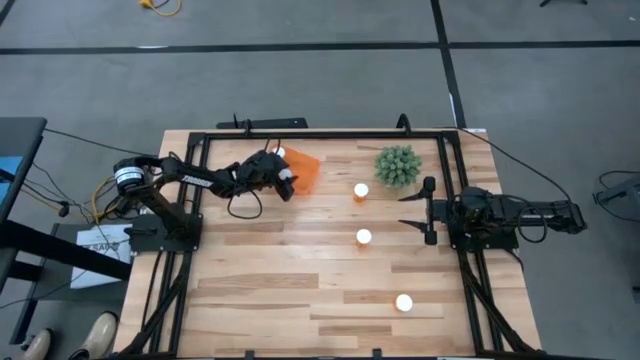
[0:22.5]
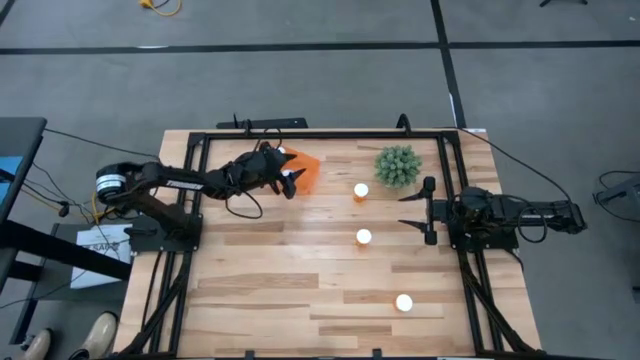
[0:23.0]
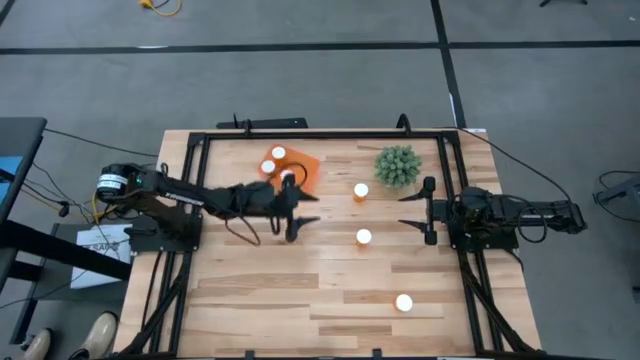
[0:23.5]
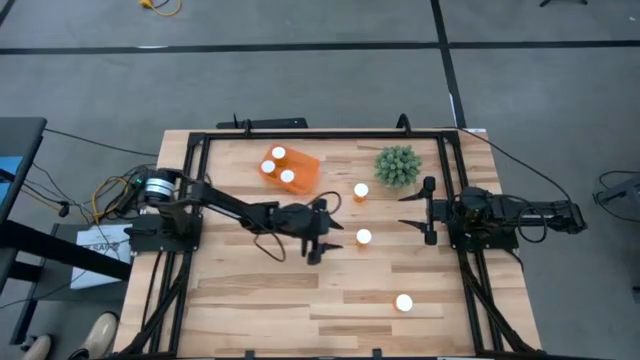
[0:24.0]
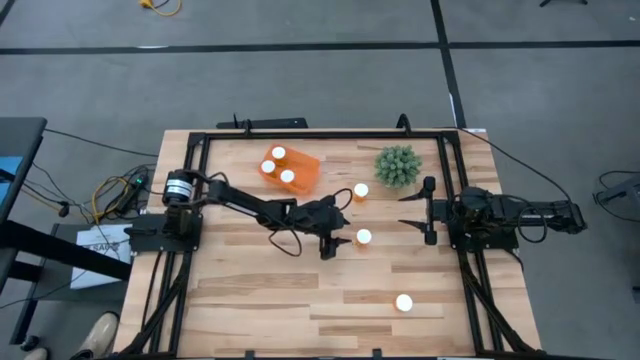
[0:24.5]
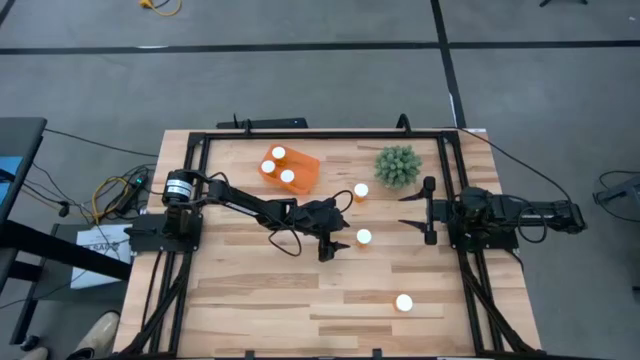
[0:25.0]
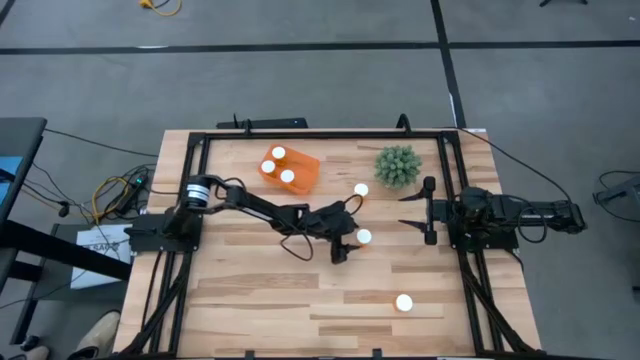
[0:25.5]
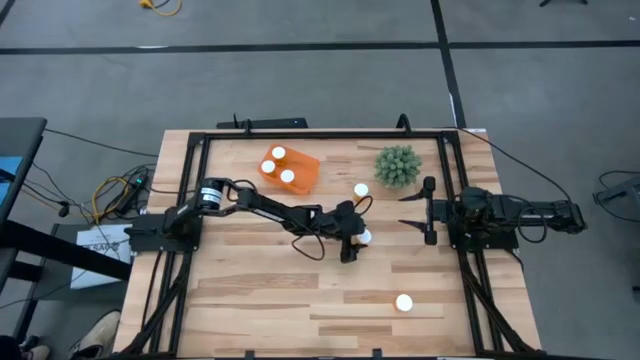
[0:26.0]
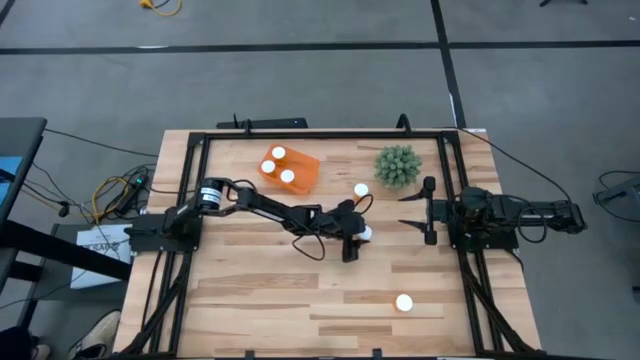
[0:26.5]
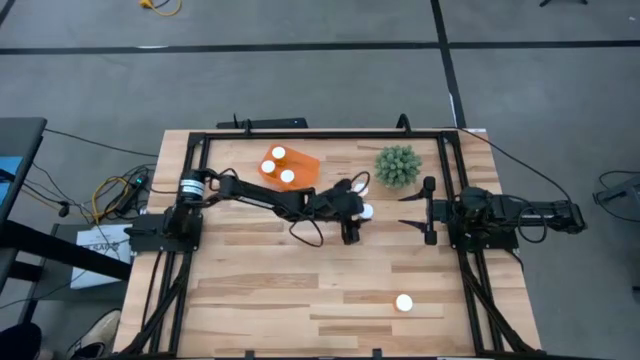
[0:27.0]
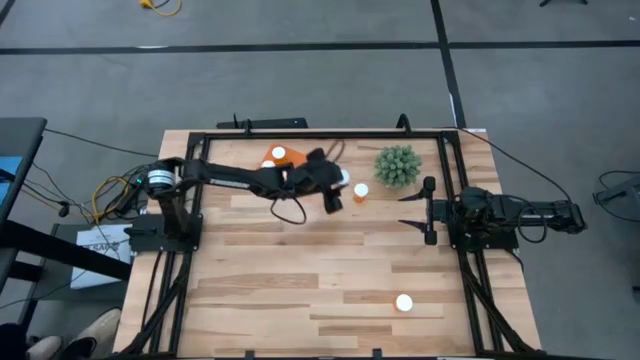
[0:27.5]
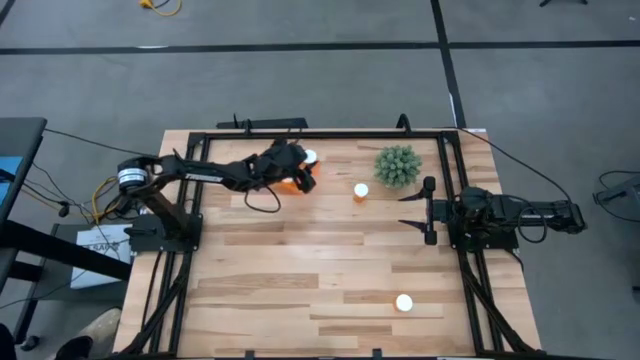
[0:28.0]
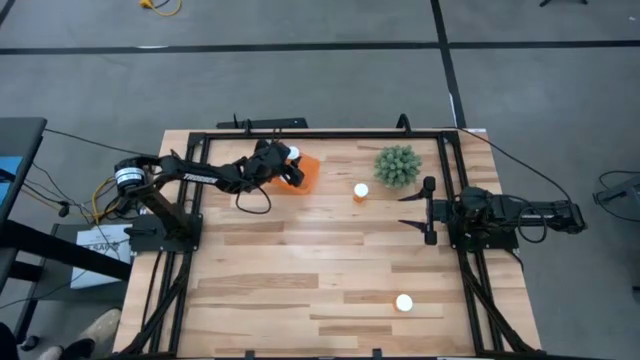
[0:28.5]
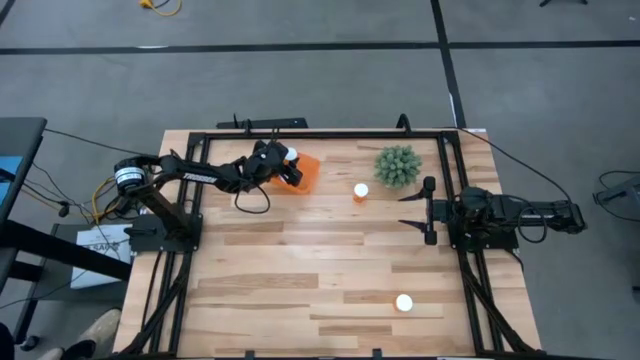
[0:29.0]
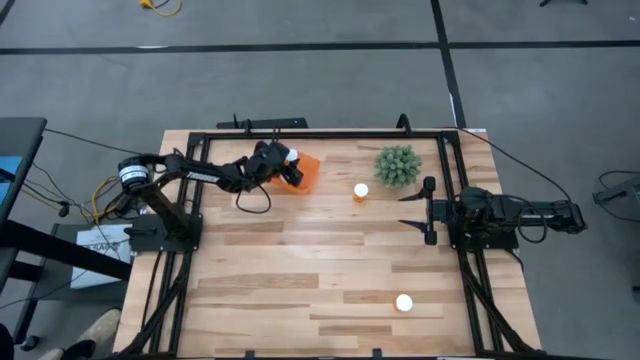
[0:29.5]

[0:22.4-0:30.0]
Task: Pick and place pill bottles into a basket
Put the orange pill bottle into the orange bin

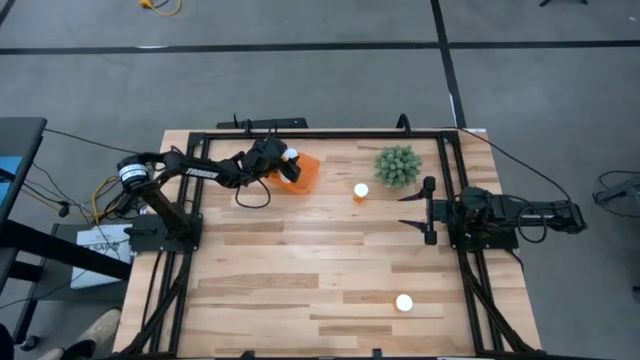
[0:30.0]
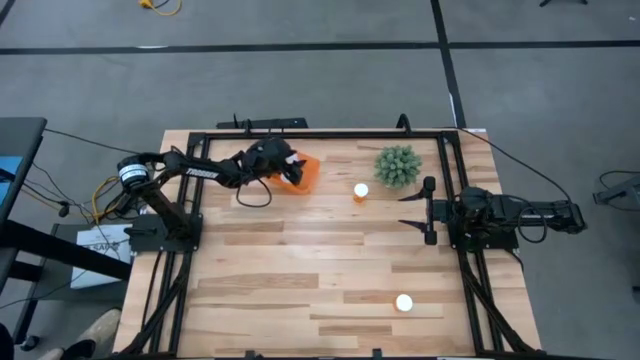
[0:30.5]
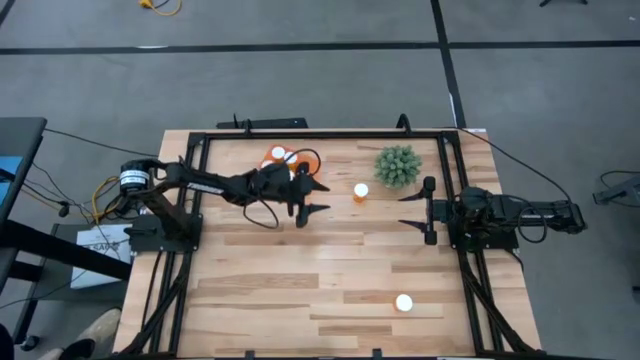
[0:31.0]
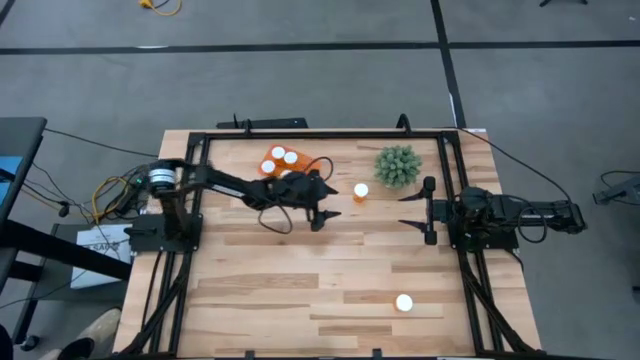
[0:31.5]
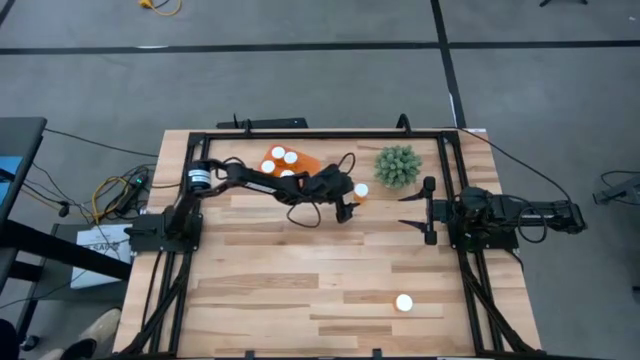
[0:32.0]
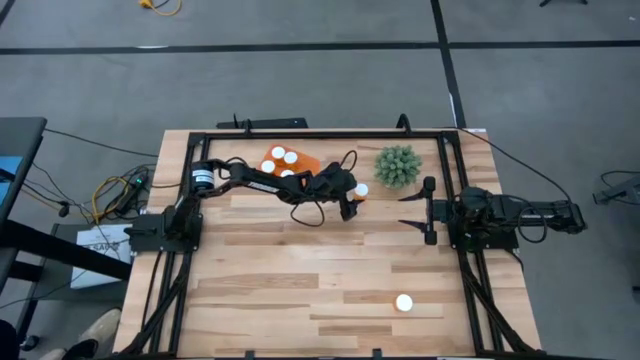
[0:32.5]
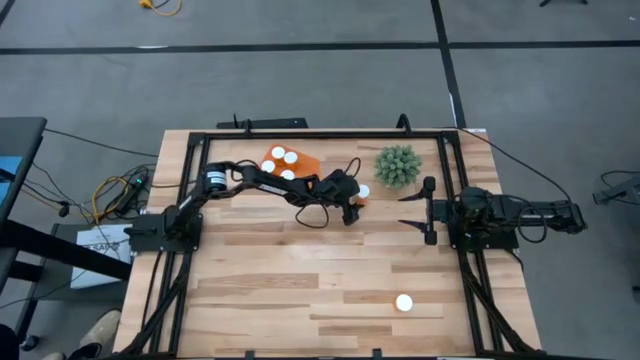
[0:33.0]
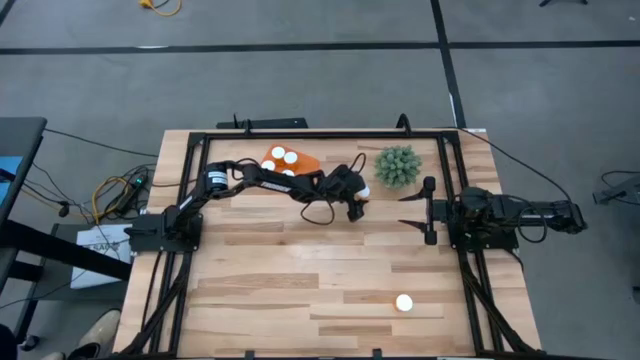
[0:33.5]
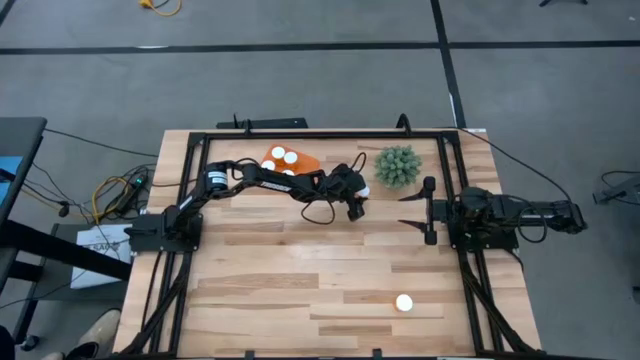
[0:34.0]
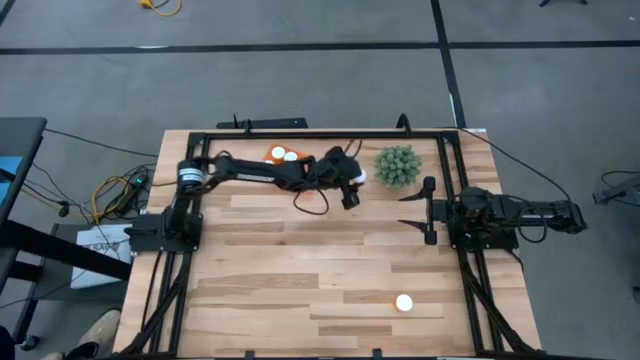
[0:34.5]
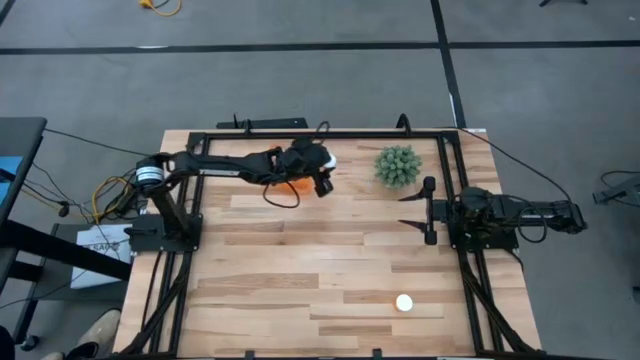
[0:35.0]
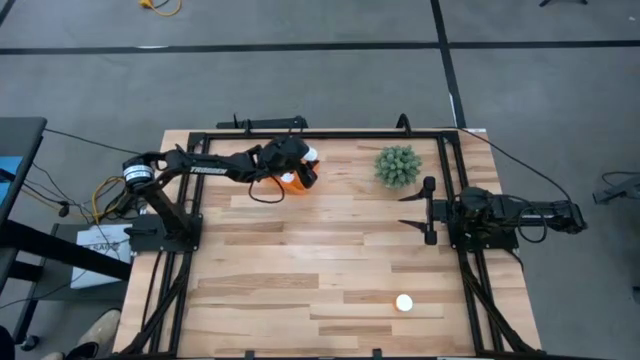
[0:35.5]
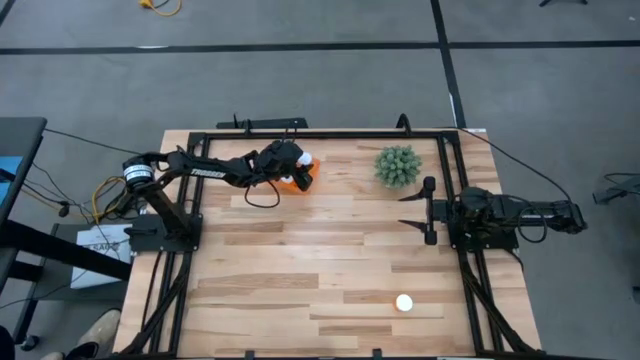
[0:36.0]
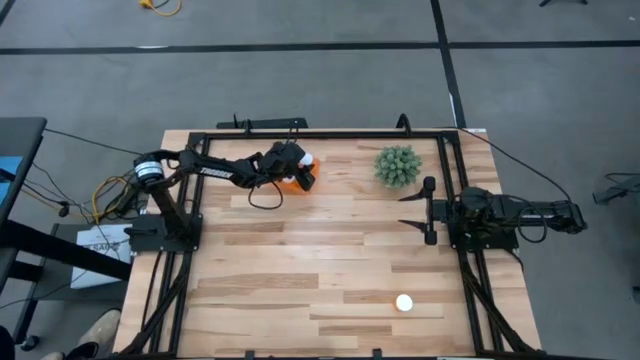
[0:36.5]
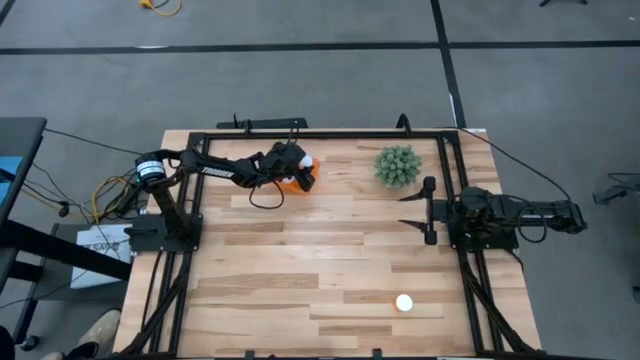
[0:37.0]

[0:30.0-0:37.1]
Put the orange pill bottle into the orange bin

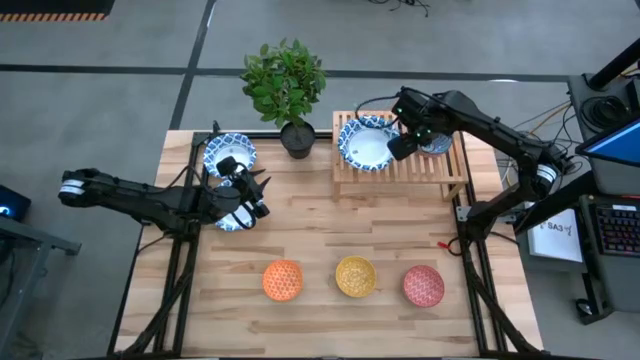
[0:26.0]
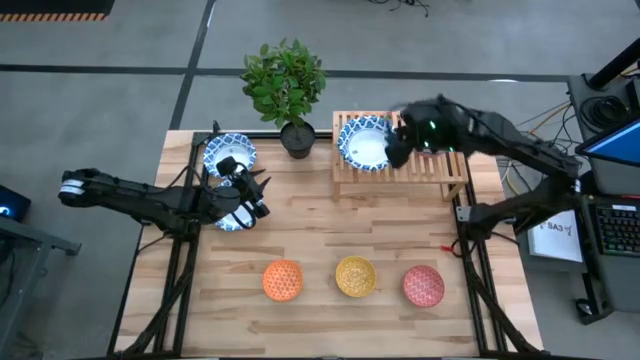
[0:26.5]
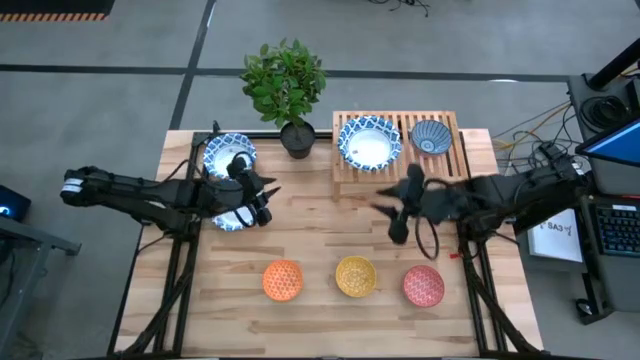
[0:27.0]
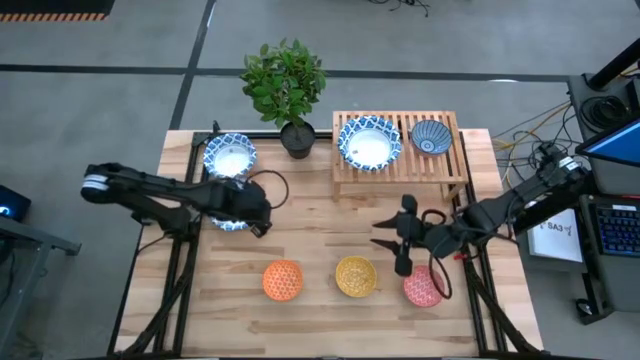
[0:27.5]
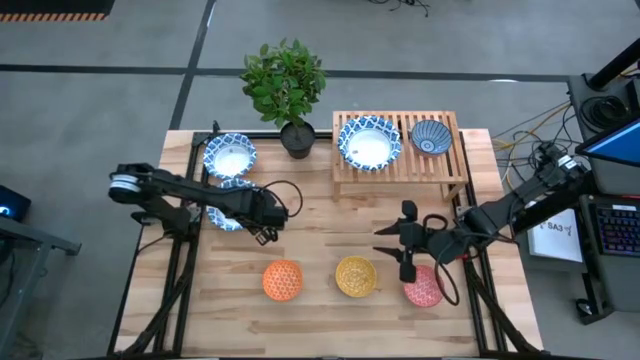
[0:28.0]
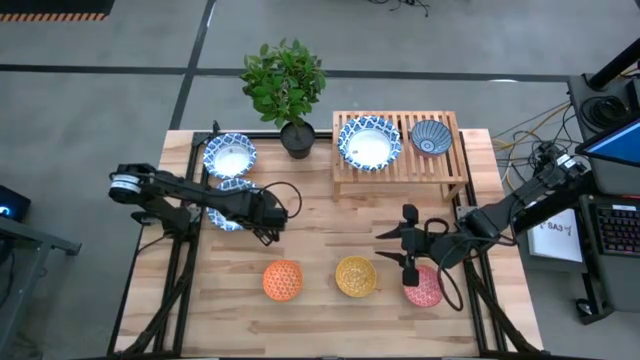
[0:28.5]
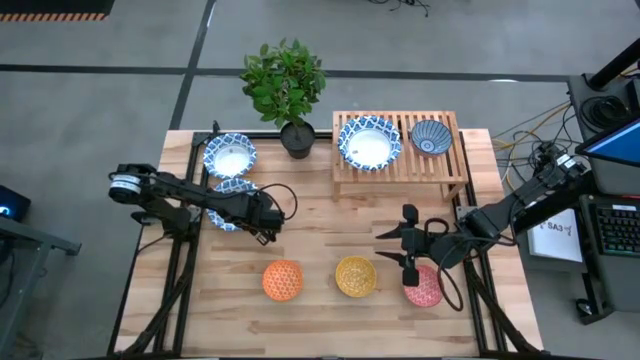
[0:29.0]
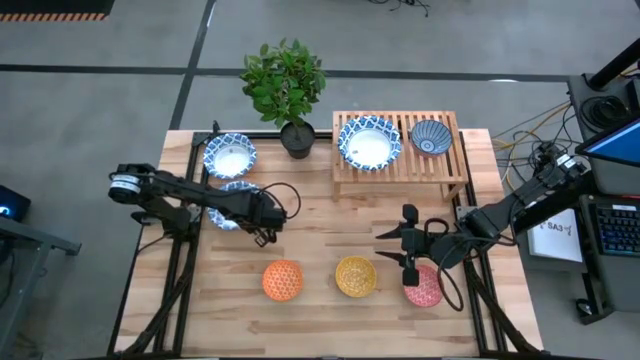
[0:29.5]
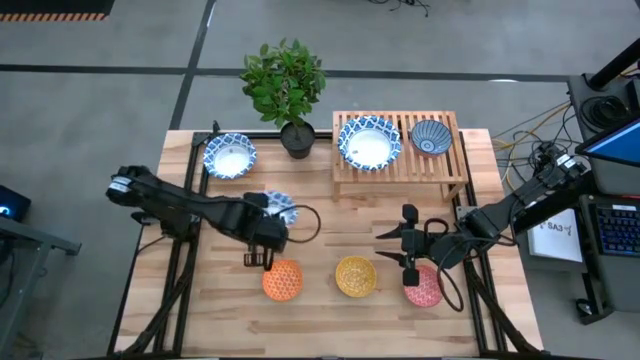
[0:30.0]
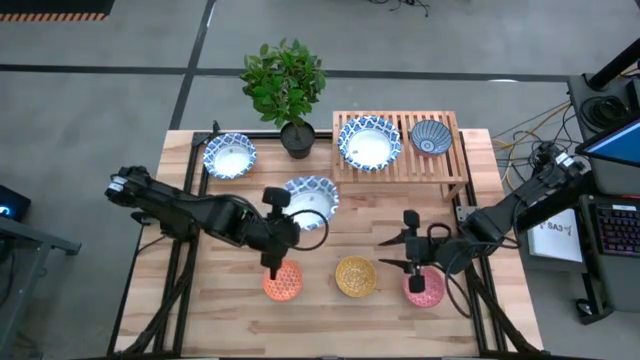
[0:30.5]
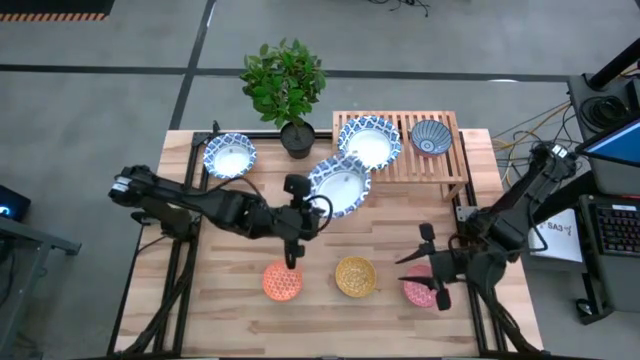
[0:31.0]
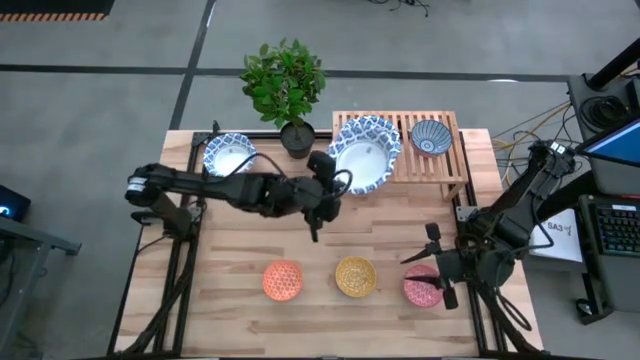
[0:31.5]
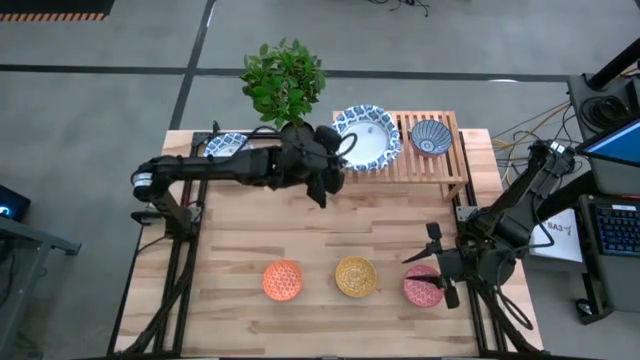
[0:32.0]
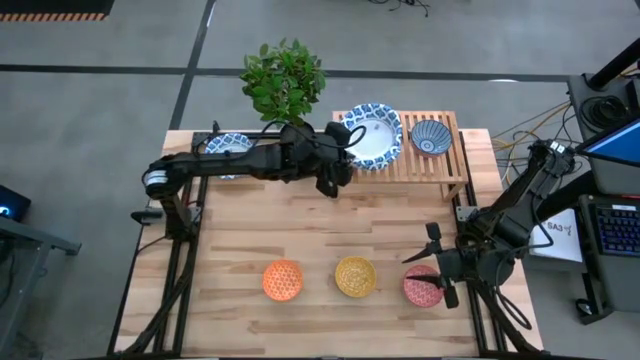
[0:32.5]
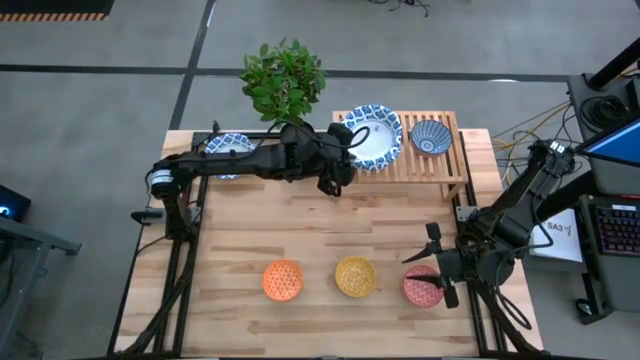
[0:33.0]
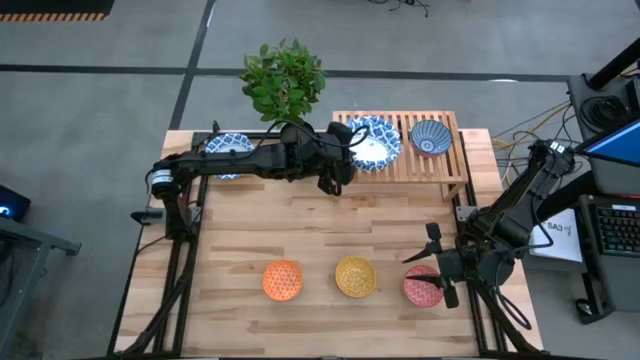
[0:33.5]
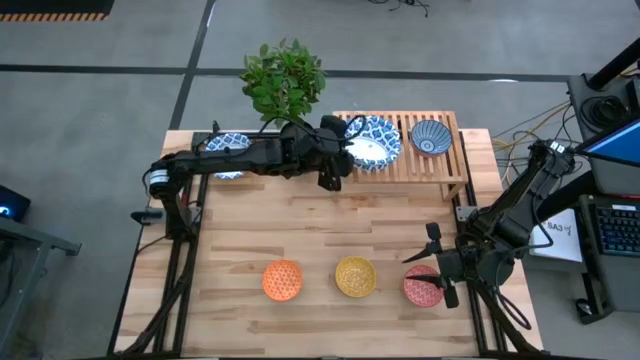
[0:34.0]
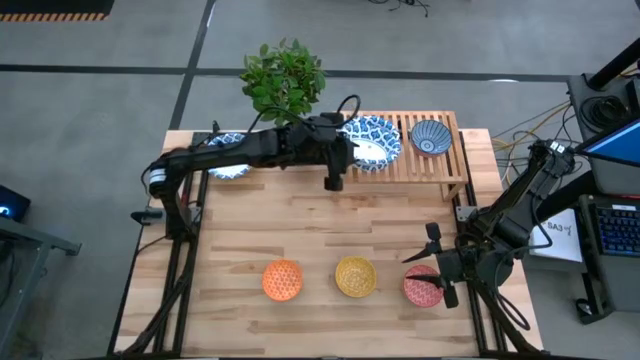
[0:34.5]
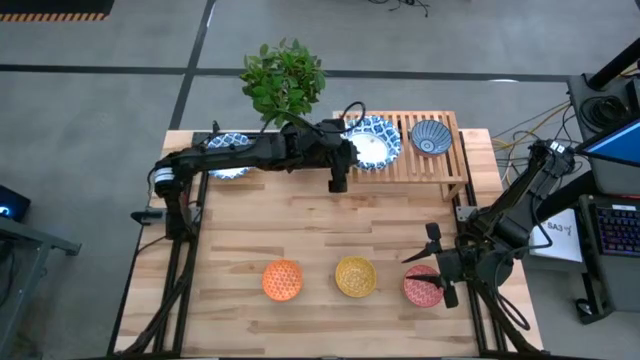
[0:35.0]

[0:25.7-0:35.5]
Task: Place and stack bowls onto a shelf
Stack the white bowl on top of the white bowl on the shelf
